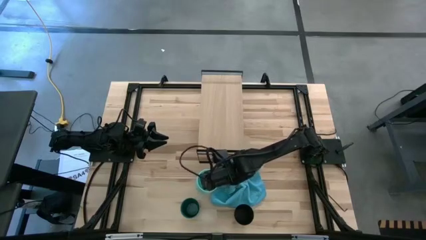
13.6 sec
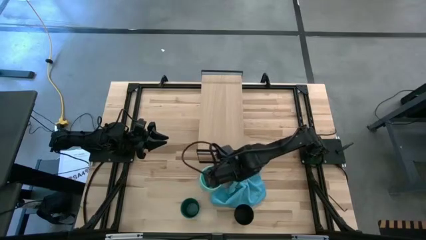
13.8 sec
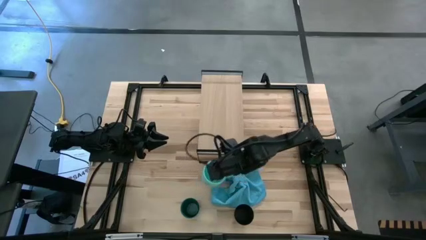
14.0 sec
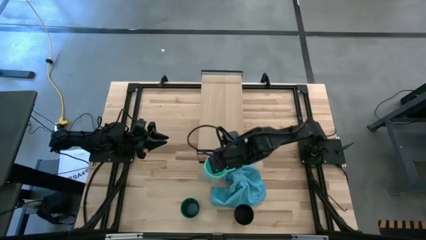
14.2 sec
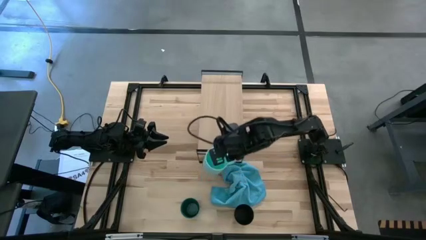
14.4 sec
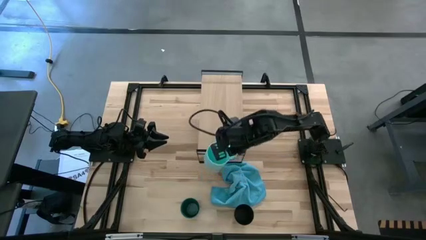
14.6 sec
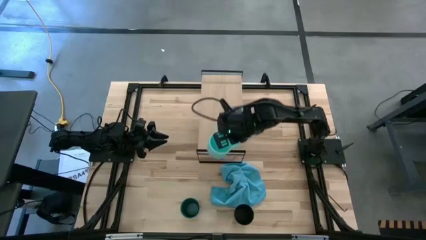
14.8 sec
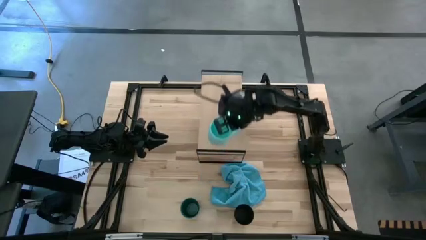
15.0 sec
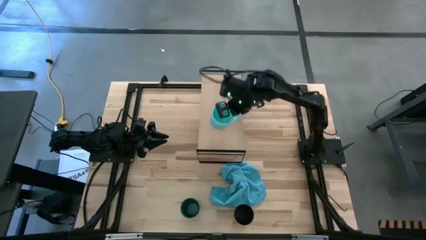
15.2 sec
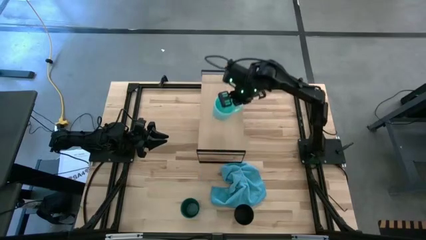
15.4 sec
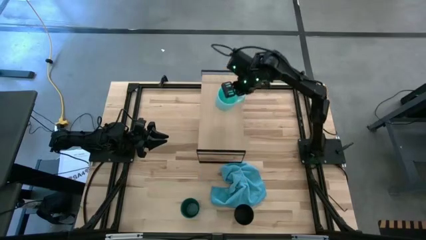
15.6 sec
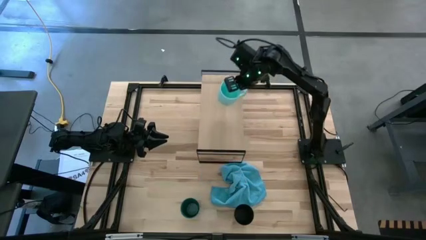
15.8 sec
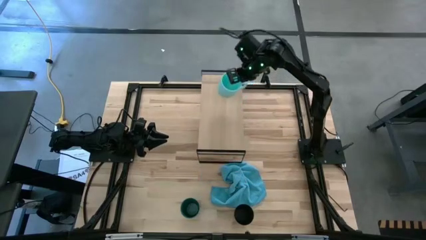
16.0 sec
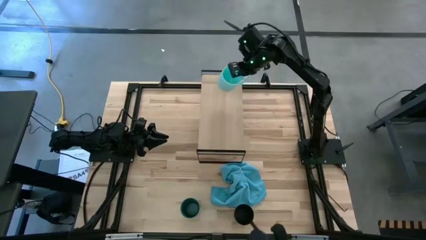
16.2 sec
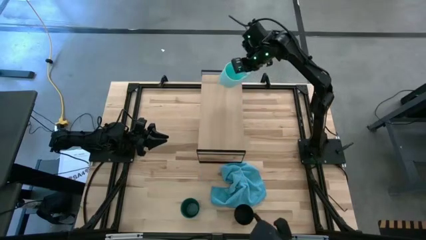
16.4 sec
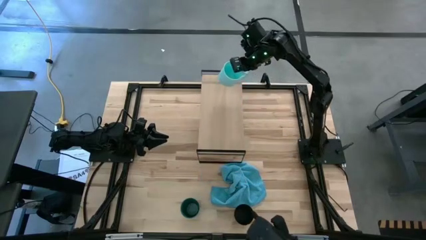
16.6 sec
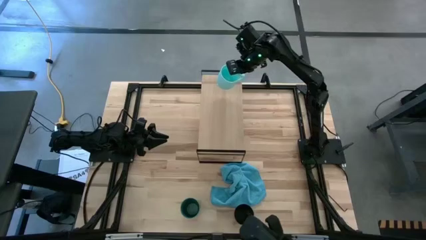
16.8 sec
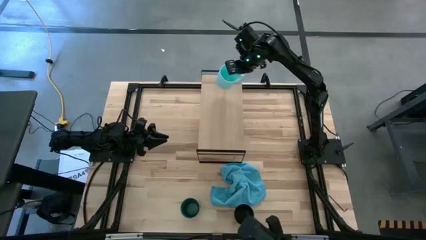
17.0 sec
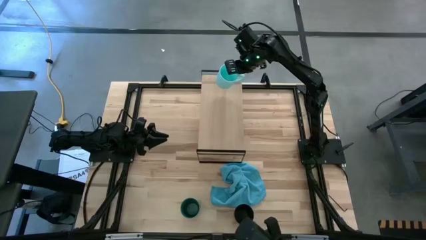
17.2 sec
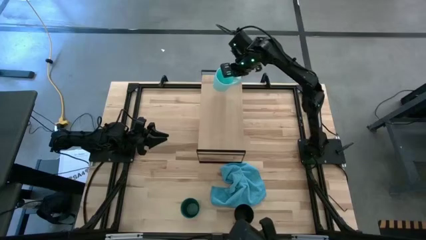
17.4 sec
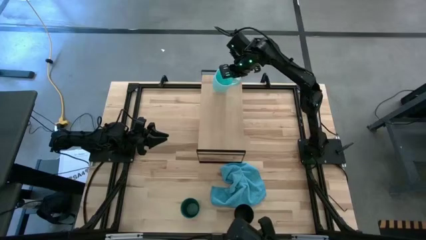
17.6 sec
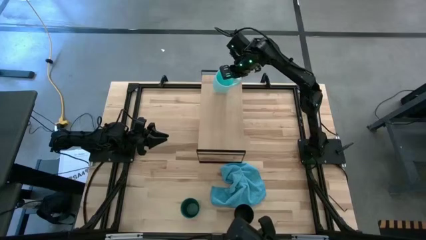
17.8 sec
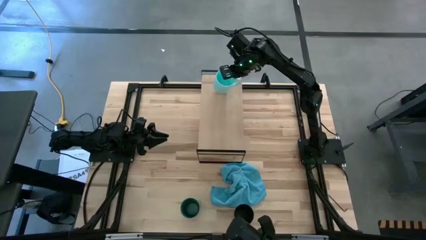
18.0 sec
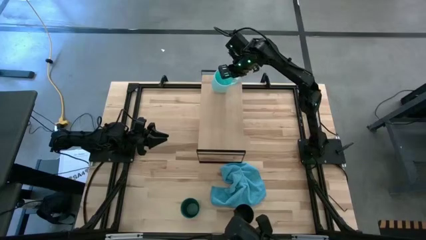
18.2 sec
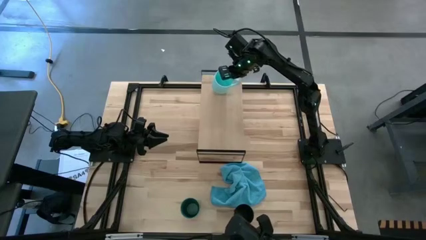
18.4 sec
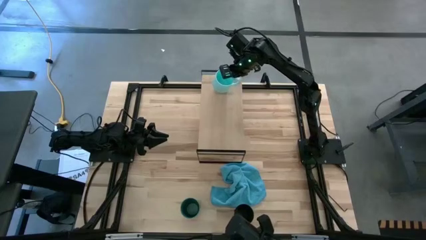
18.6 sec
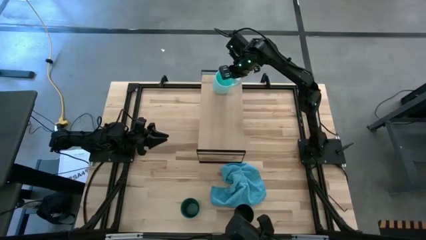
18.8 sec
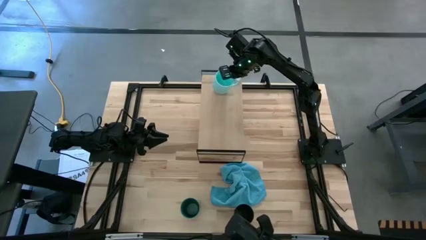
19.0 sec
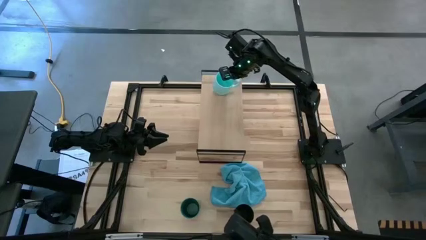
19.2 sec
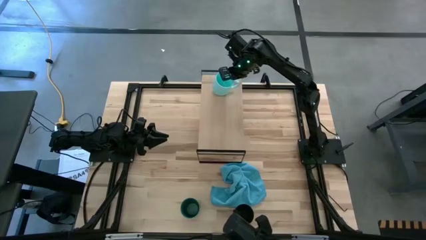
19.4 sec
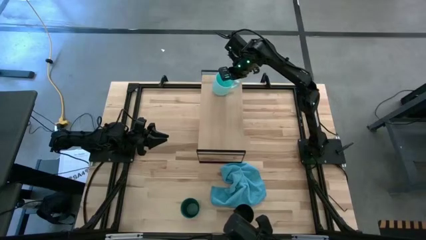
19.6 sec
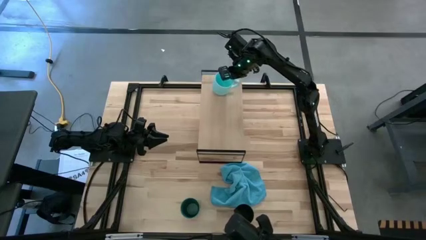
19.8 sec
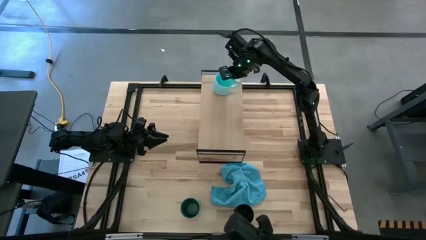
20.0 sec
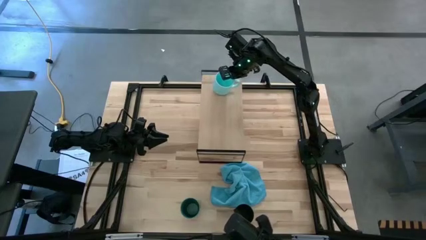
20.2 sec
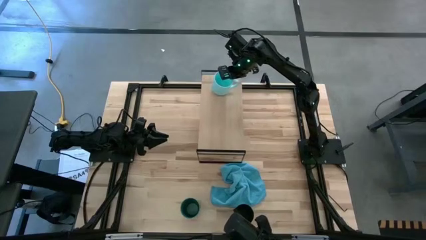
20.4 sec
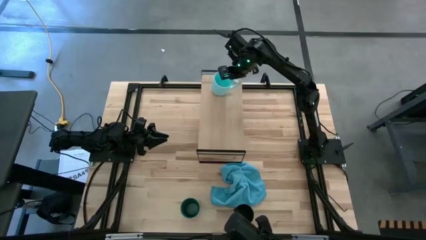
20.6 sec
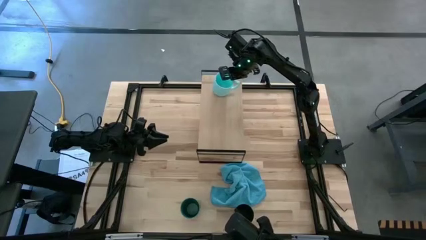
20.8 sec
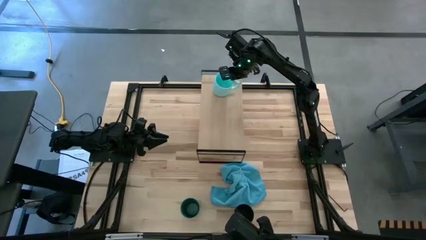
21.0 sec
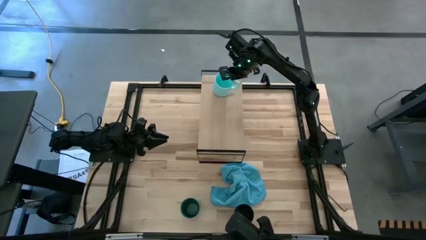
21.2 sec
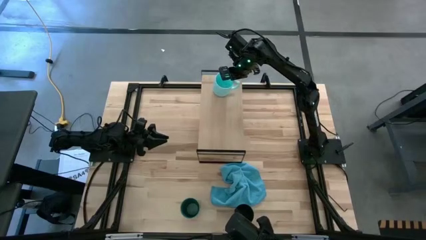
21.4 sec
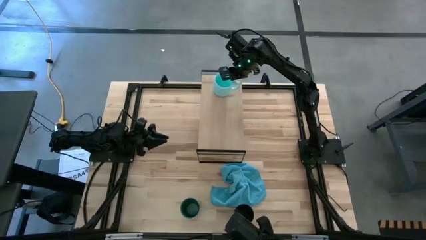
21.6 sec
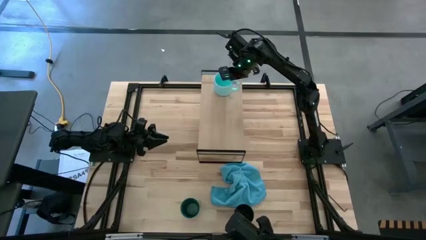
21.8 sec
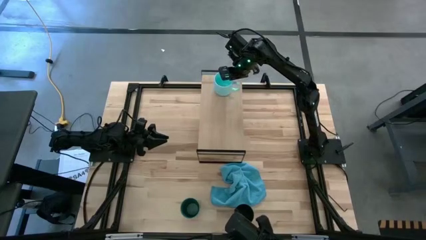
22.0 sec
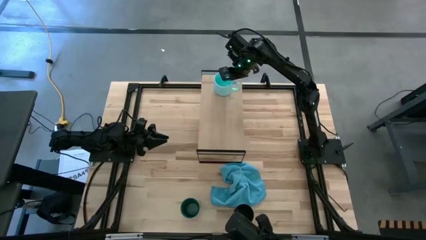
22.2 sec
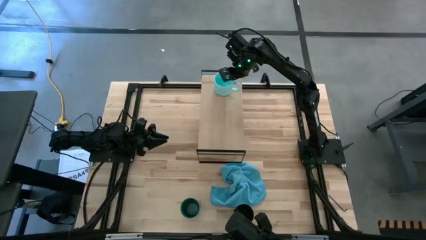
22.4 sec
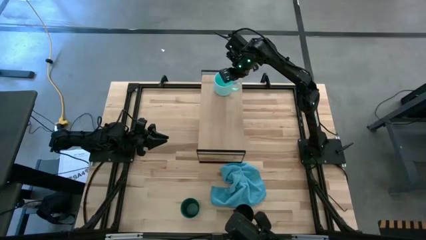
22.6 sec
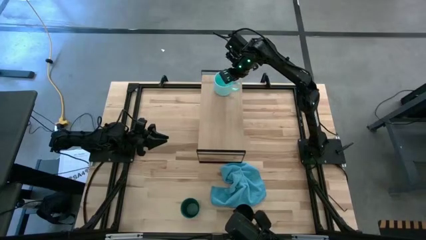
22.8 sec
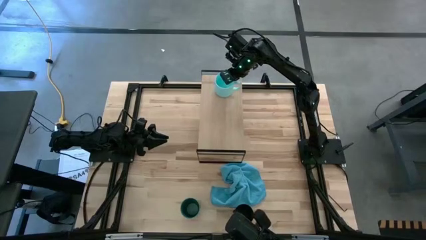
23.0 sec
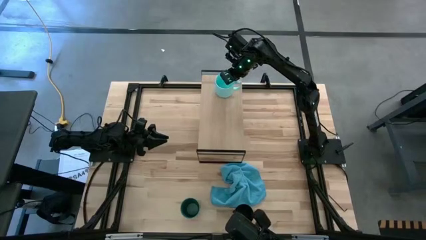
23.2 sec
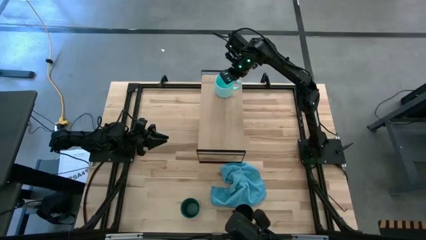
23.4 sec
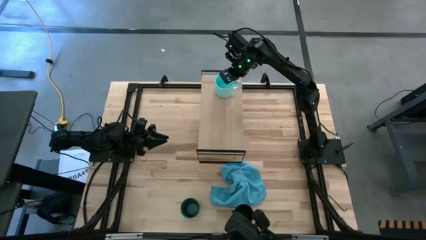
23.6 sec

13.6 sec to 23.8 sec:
Task: Stack small to large cups/mugs on shelf
Put the blue mug on the shelf
